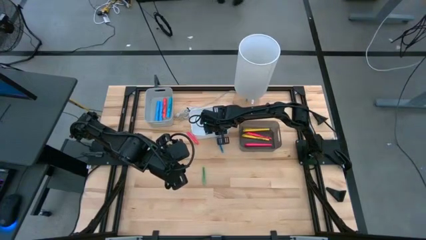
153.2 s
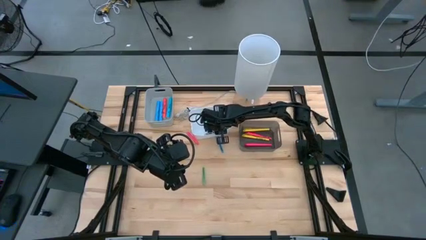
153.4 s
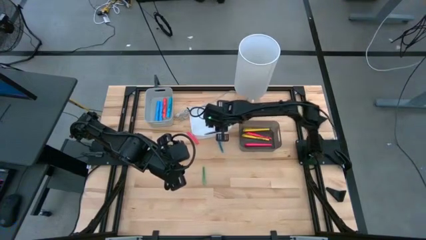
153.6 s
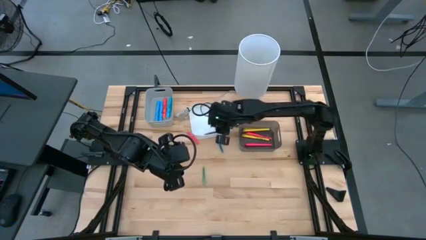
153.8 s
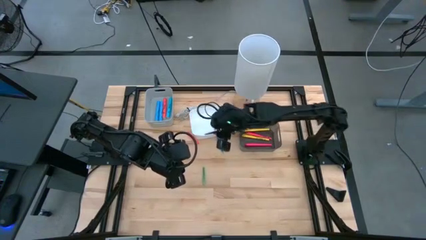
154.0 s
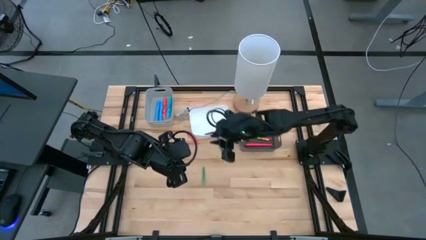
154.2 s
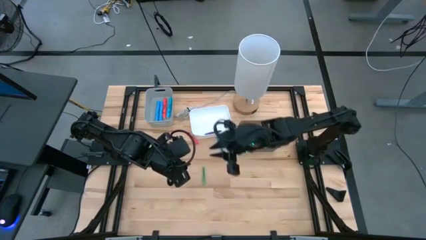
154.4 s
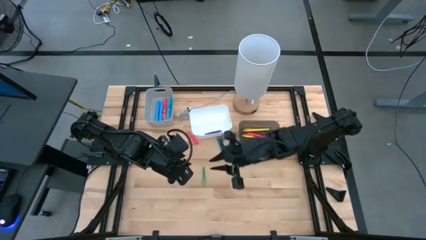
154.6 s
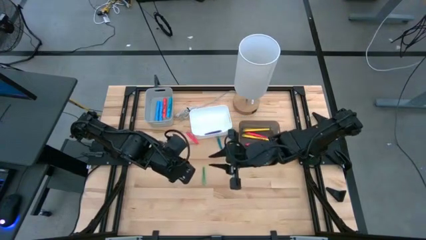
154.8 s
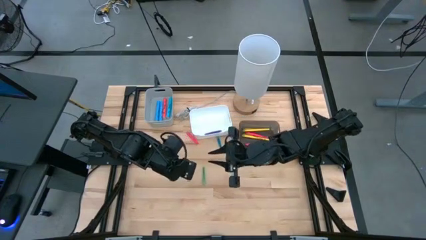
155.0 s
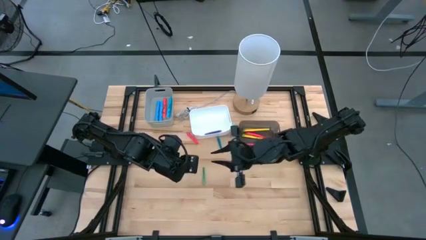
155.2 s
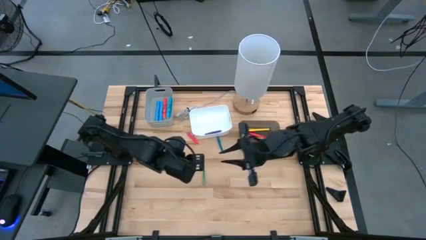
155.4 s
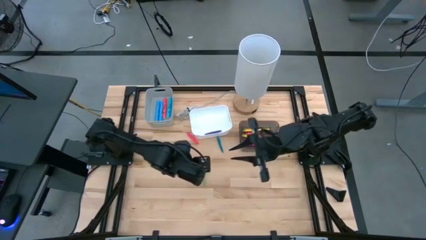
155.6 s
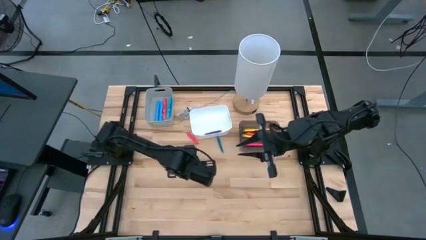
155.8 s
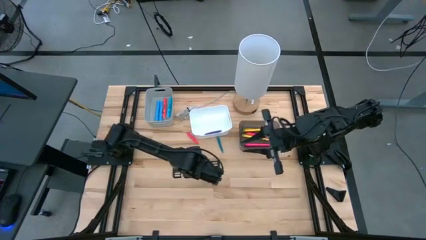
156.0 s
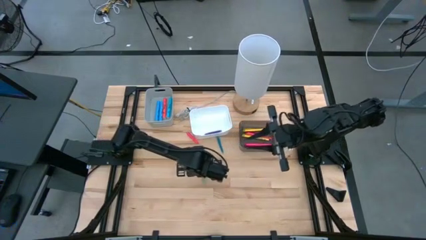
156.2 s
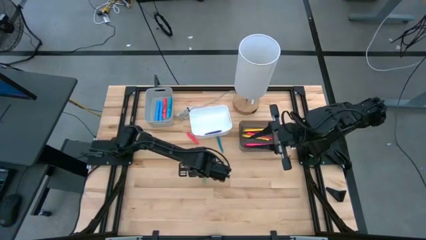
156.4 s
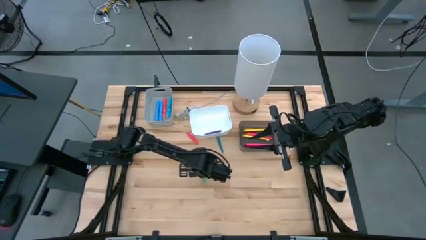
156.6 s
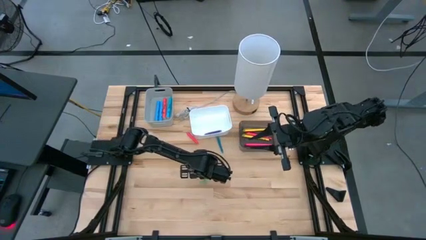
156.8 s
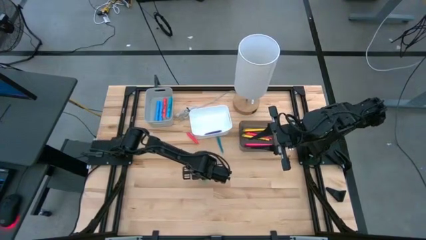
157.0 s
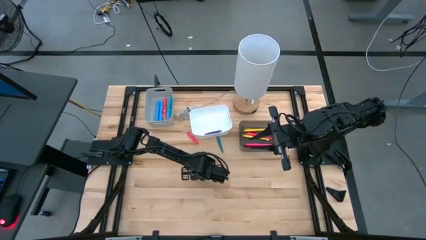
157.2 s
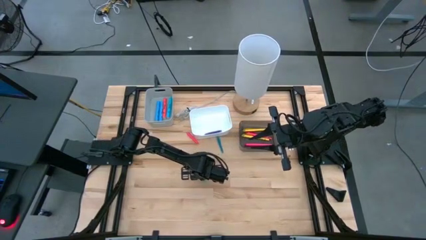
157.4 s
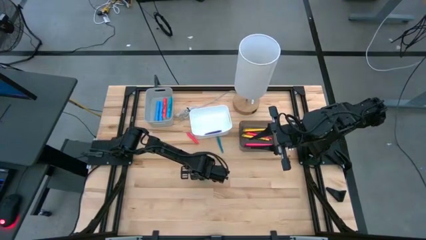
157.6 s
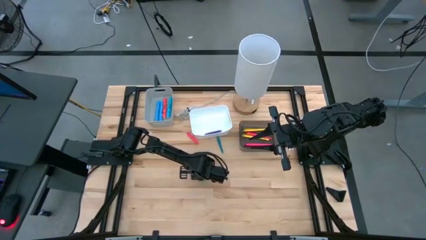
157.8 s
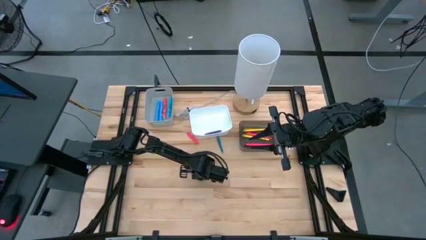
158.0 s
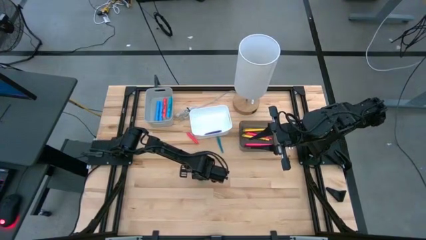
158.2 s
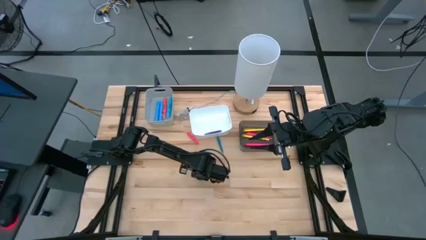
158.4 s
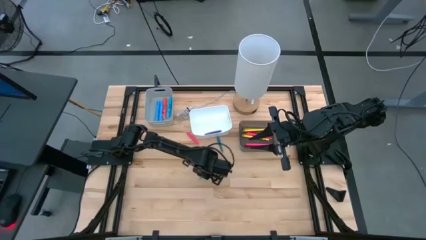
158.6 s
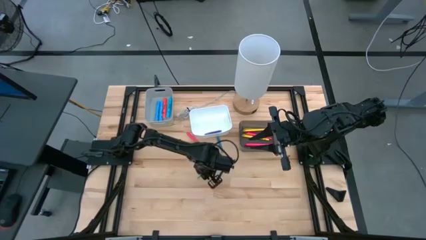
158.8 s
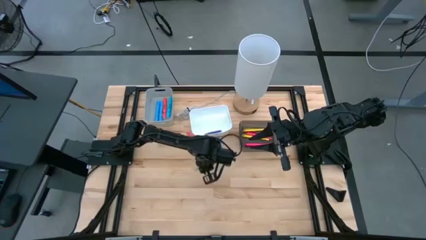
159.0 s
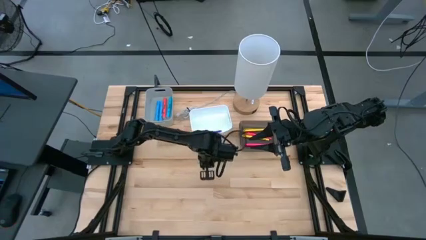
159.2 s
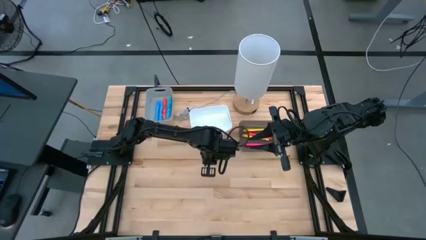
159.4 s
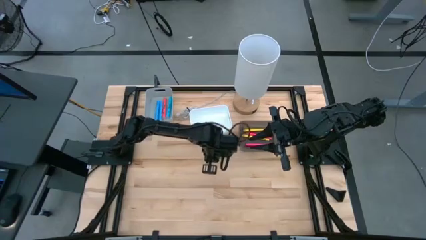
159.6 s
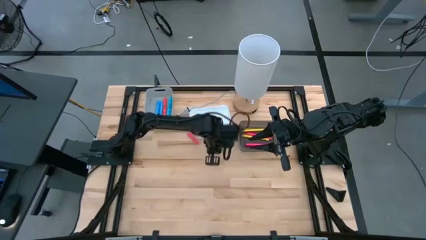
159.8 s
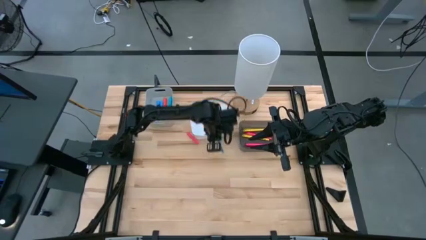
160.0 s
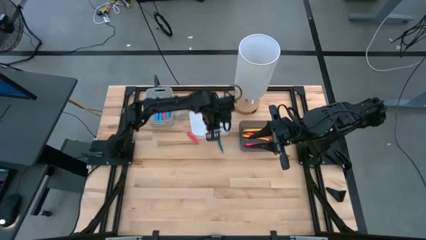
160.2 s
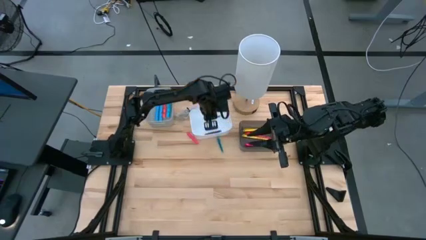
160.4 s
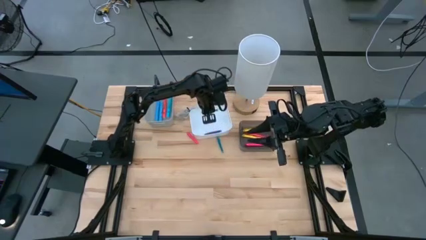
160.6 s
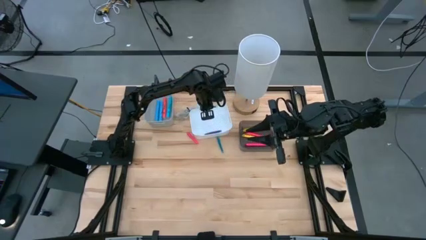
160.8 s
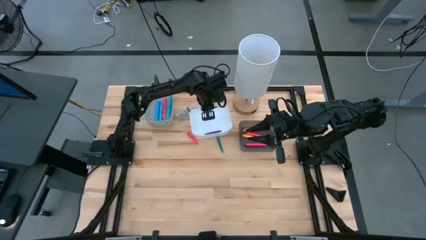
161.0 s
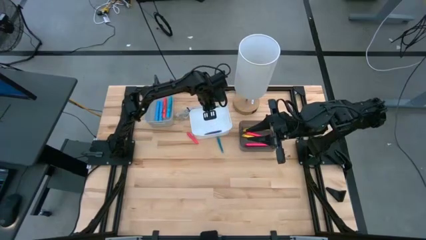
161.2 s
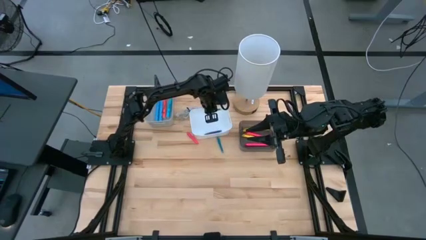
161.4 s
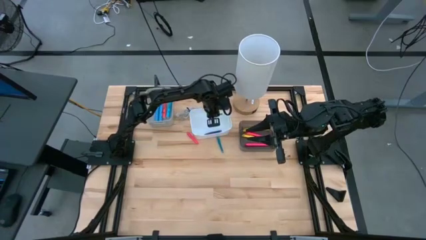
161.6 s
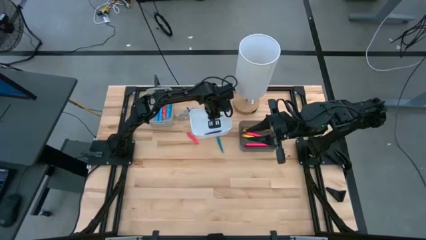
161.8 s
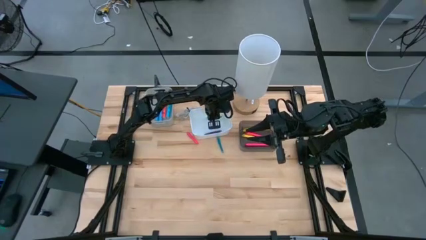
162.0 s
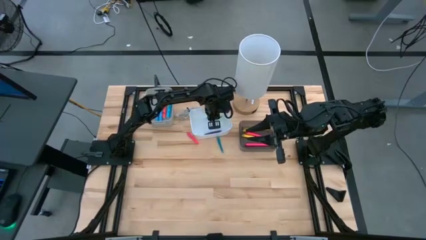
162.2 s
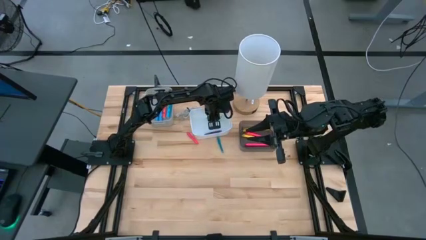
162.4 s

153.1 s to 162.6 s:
Task: Pick & Place Markers
Put the transparent green pen into the white bin

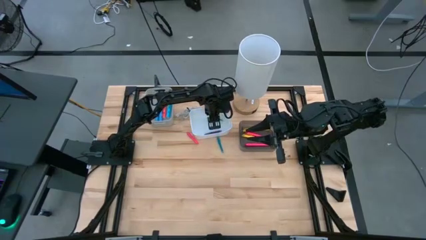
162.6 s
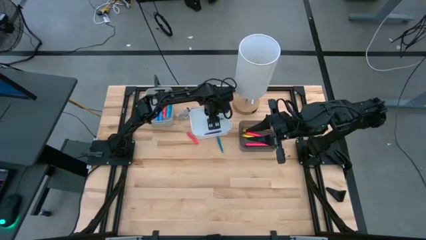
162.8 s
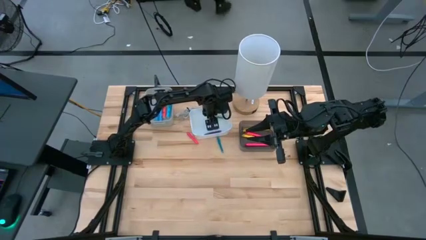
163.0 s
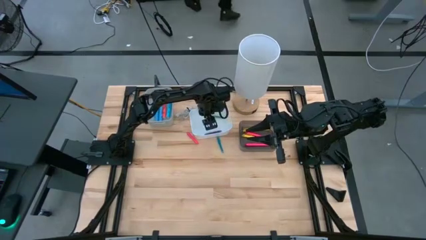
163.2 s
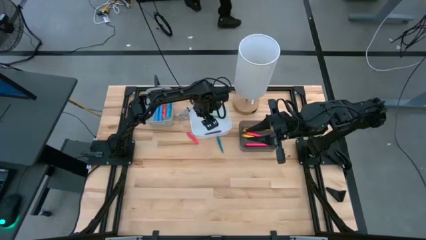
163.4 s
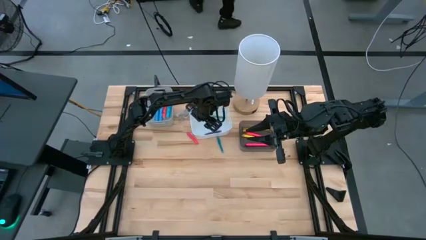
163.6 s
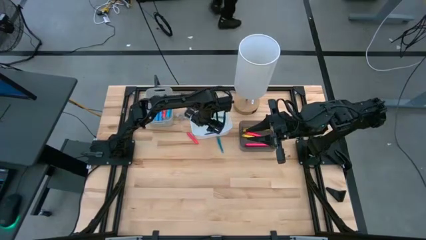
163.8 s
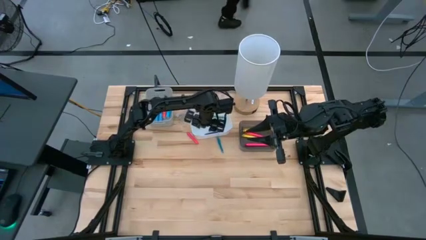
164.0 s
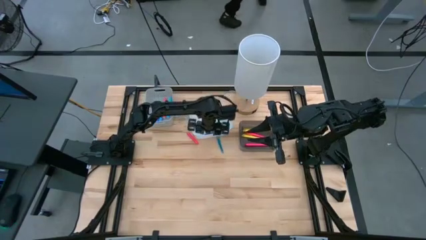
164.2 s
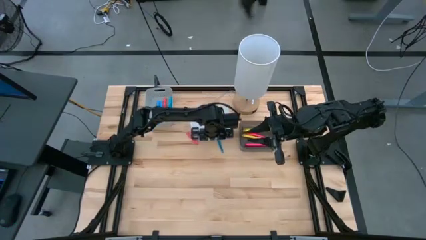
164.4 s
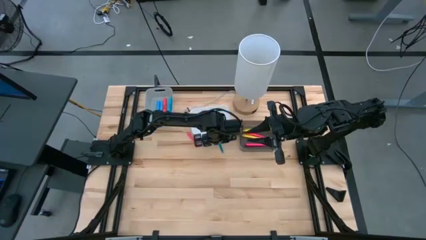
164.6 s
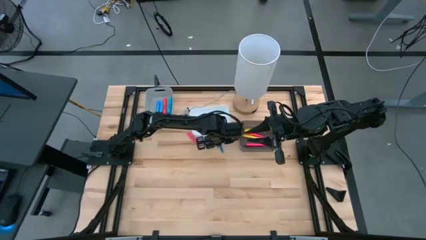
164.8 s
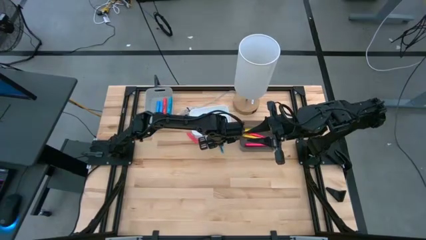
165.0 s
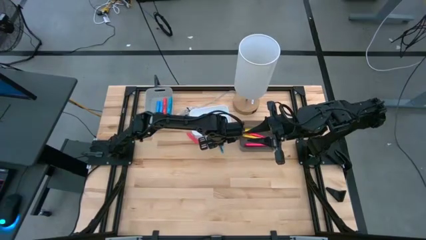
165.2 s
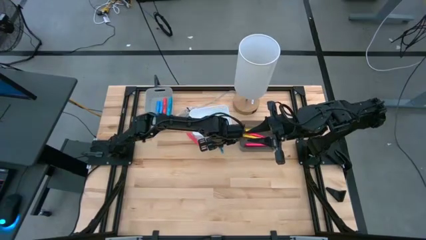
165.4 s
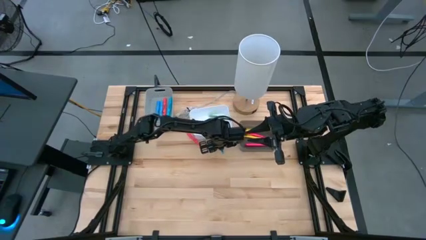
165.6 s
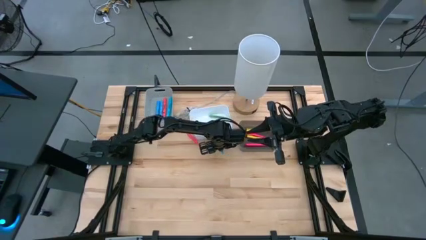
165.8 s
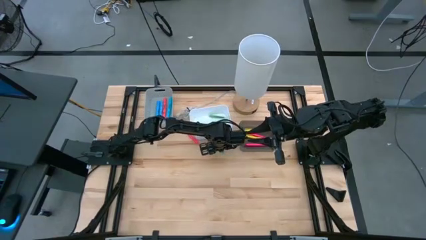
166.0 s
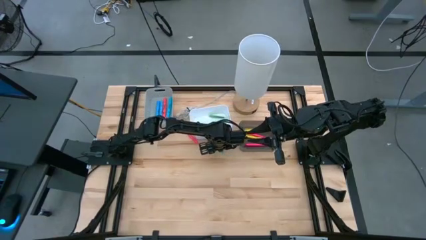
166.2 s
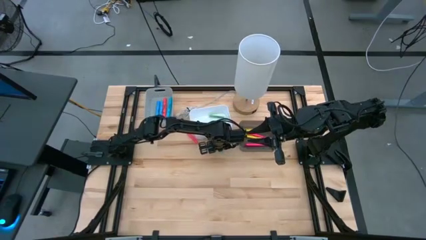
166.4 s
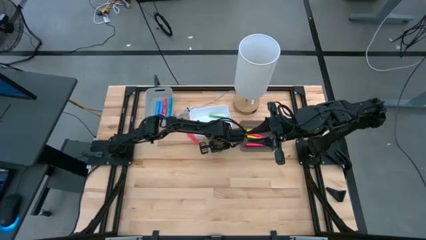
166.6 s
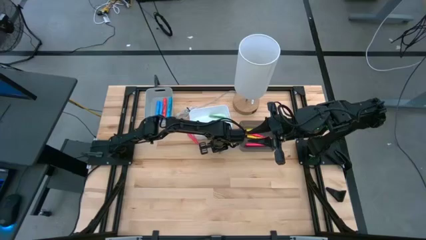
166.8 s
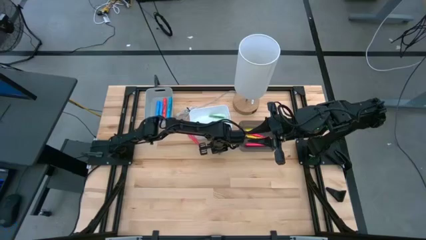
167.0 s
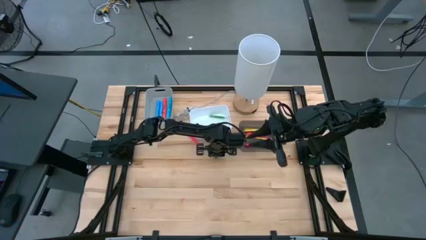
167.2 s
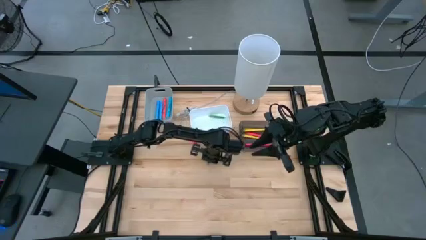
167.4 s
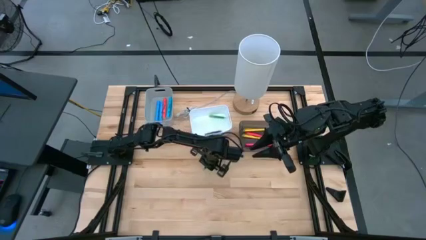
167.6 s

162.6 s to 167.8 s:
Put the transparent blue pen into the white bin

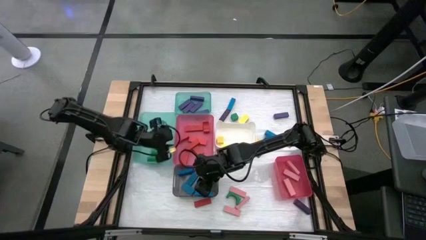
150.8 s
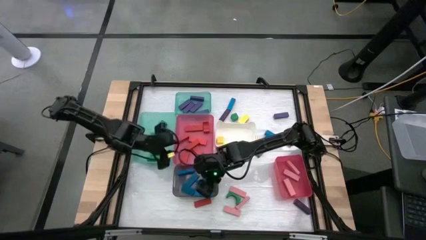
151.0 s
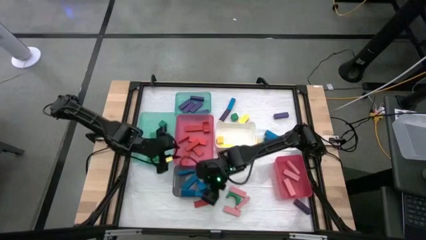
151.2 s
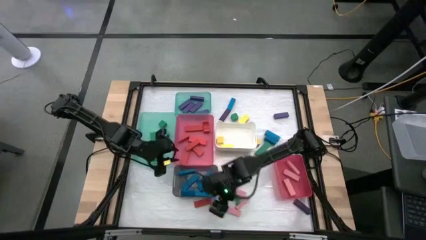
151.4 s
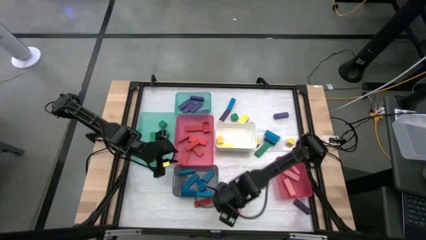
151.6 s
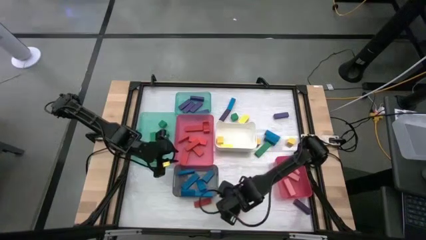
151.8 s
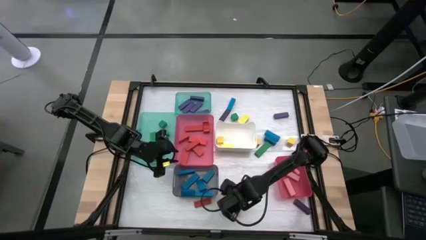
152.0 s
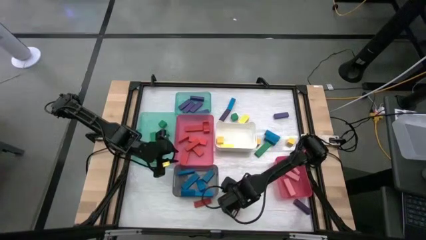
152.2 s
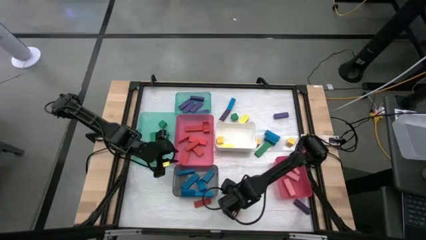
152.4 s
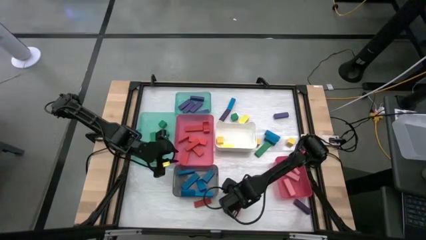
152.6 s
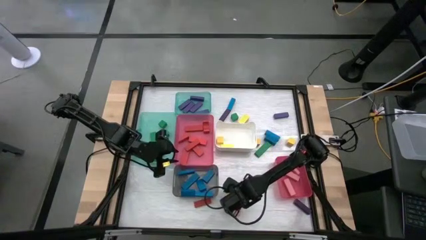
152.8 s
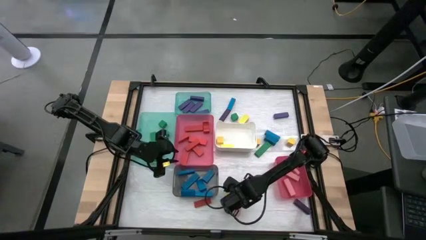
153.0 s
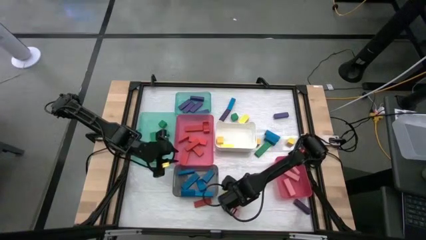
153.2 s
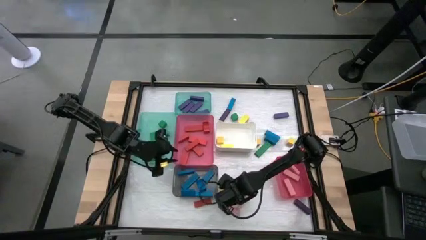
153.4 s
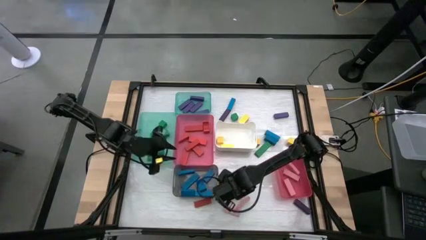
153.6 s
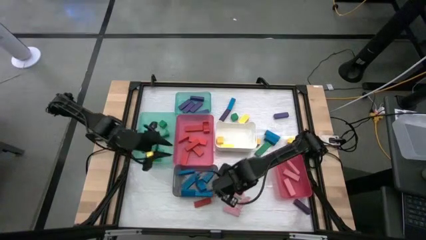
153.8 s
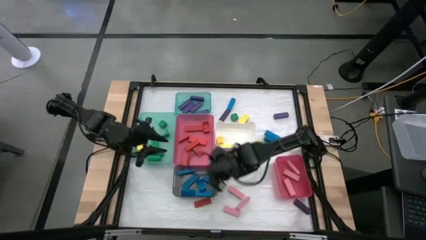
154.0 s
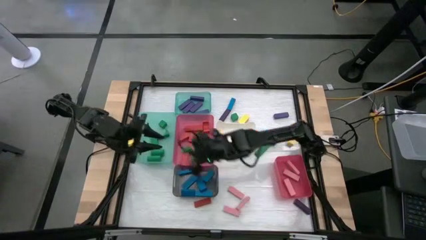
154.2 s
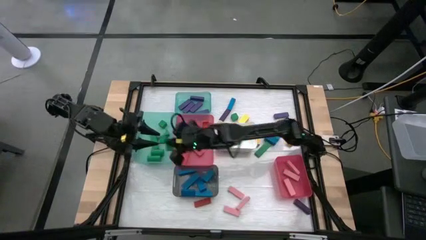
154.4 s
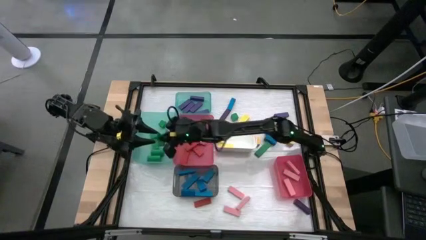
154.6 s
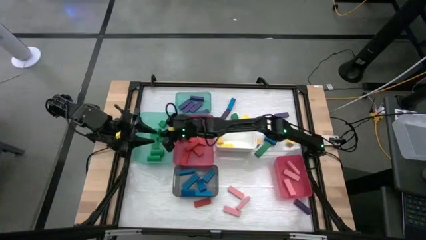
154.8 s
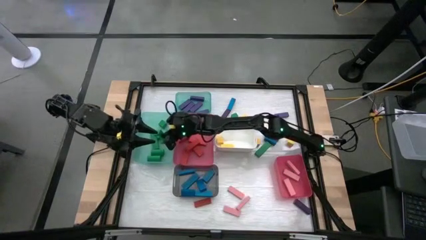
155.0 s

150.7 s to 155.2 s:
Task: Sort blocks
Put the green block into the bottom green bin
